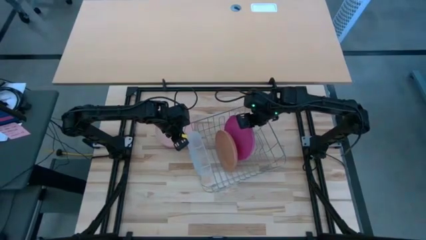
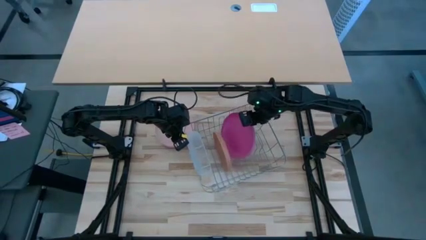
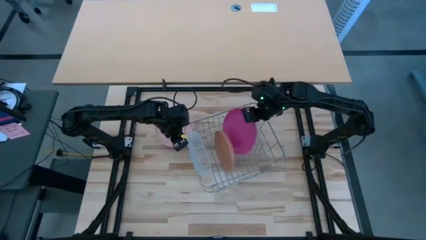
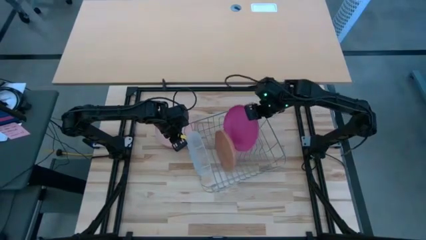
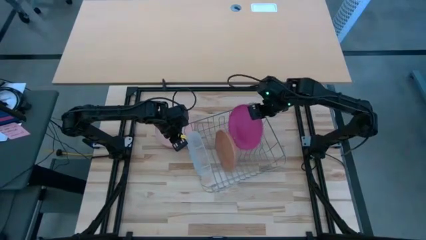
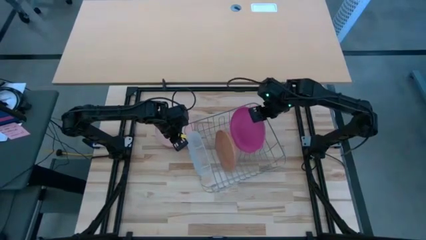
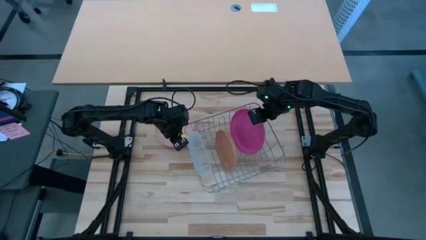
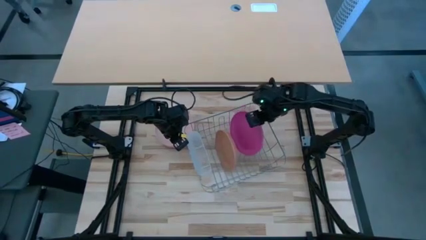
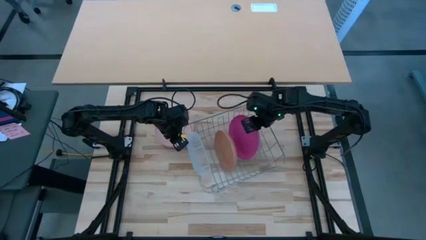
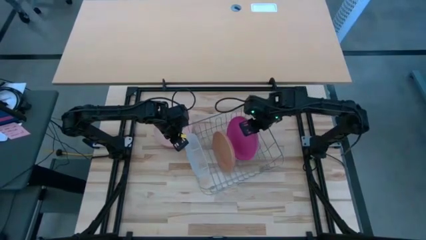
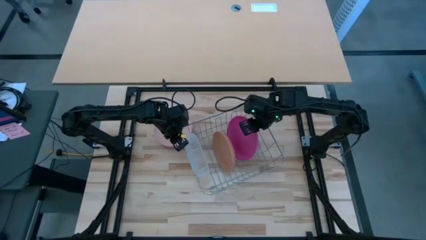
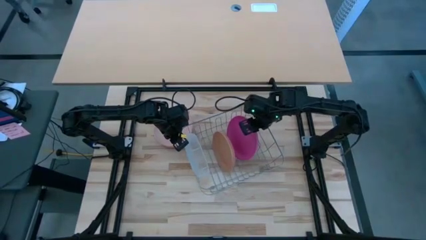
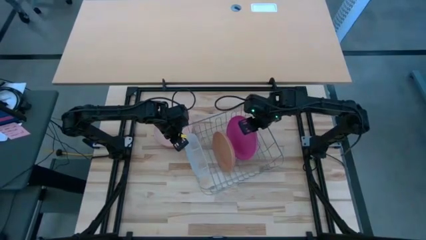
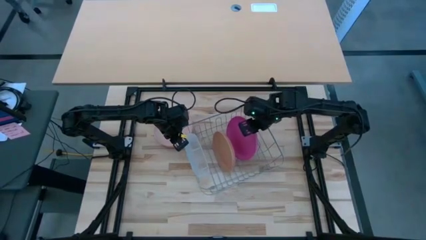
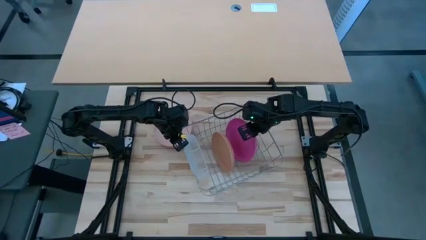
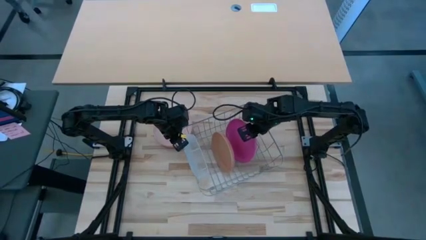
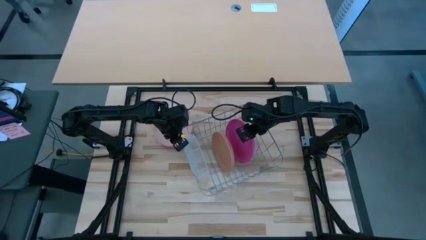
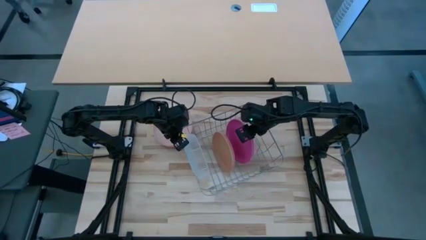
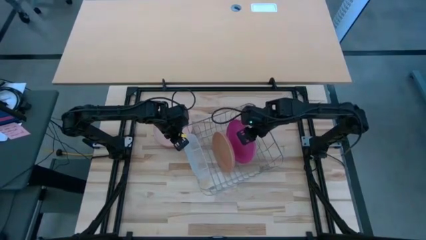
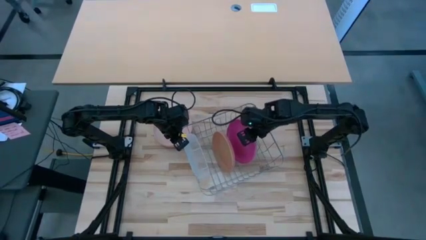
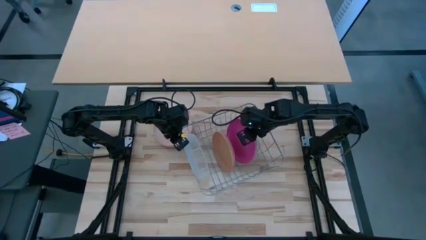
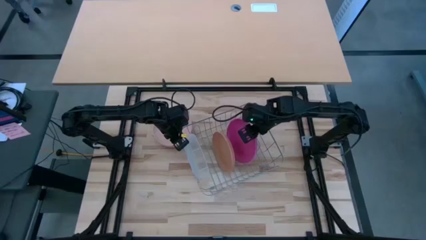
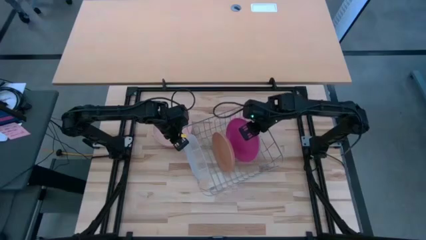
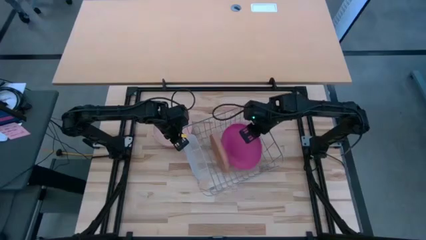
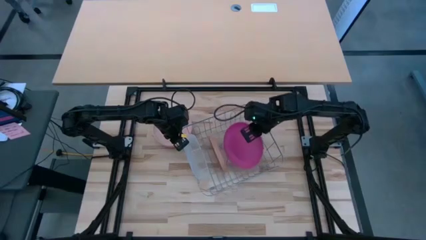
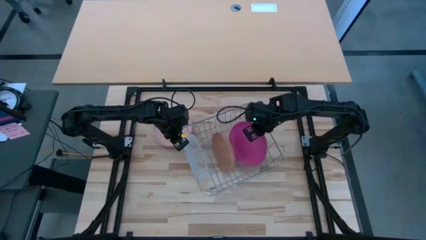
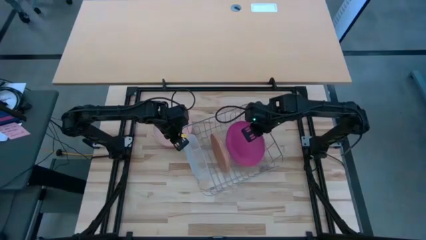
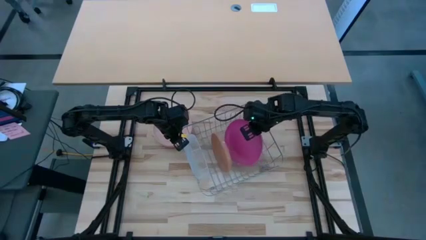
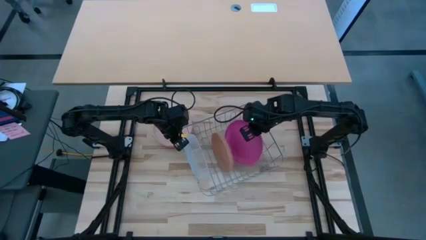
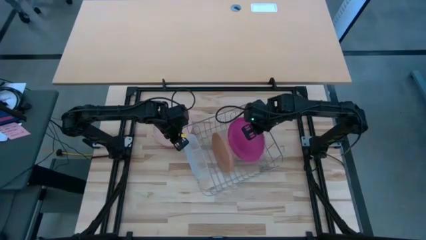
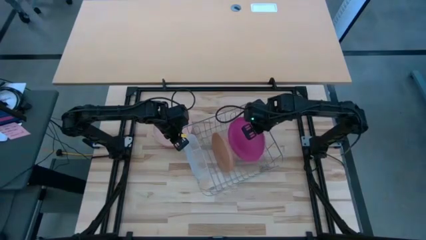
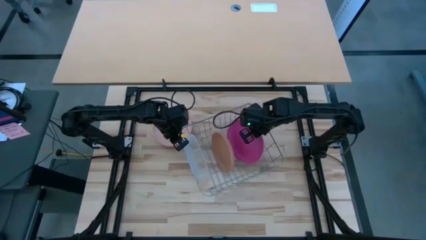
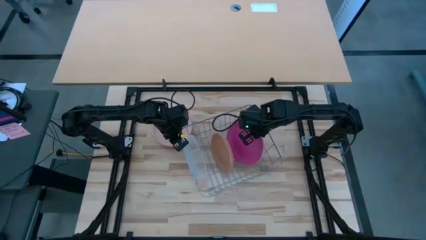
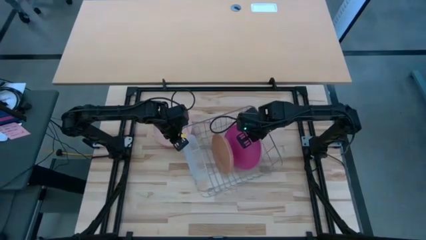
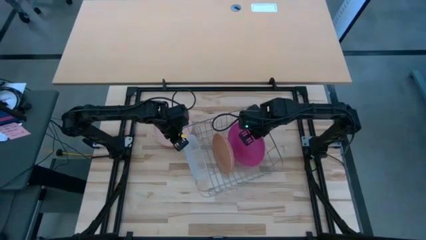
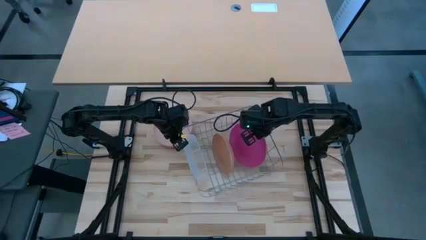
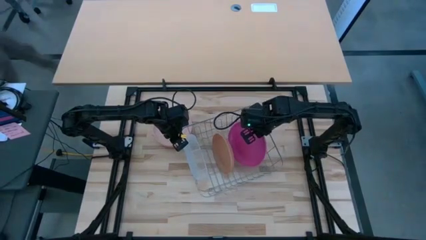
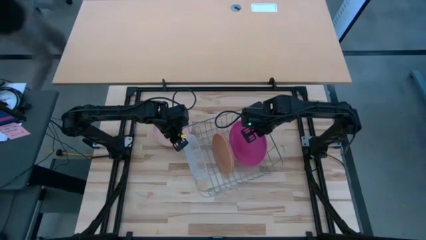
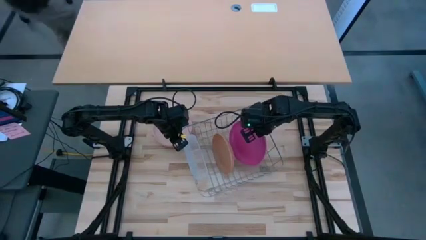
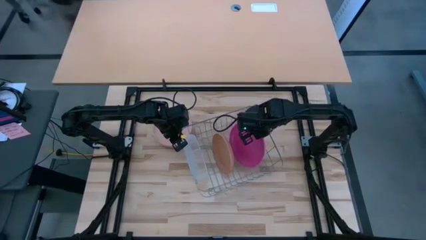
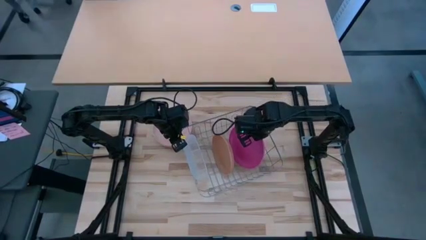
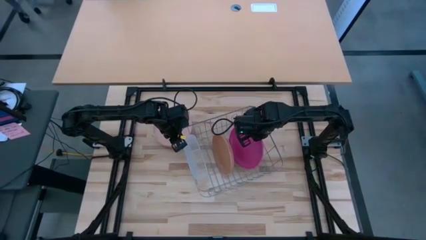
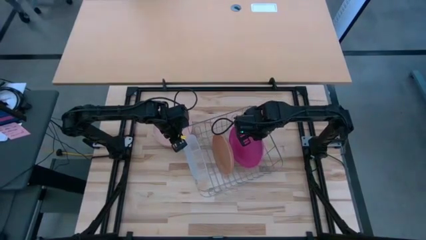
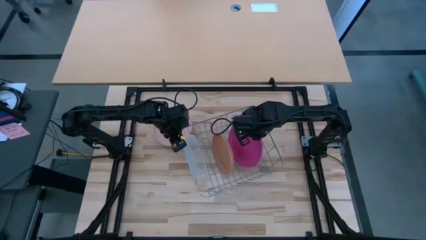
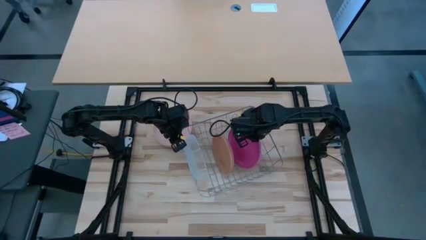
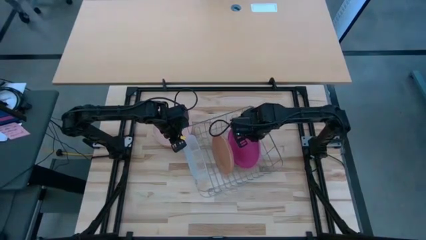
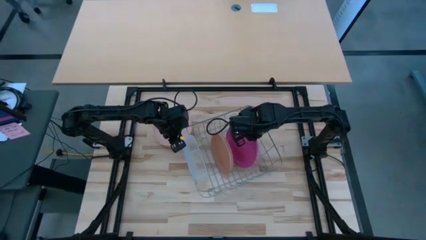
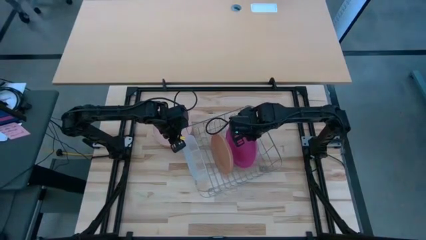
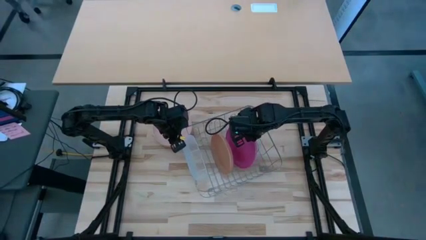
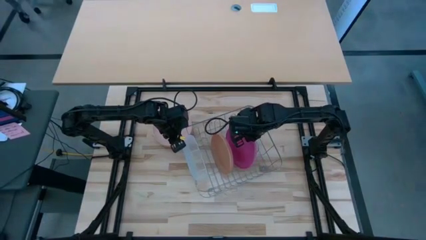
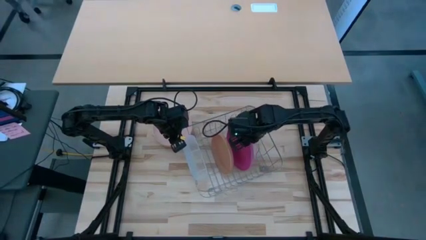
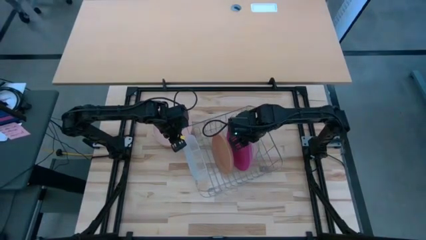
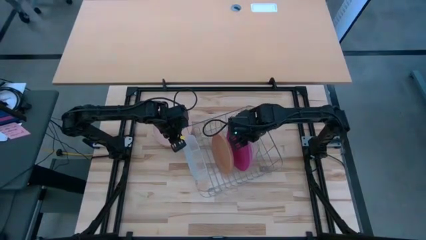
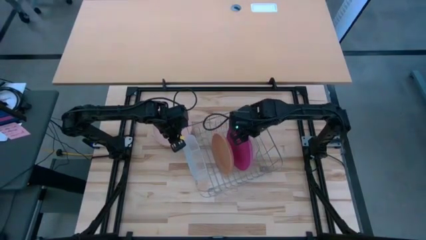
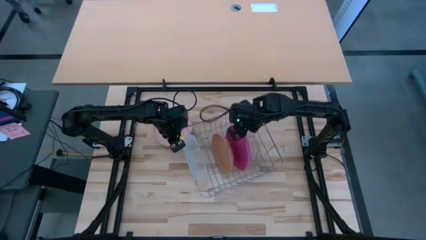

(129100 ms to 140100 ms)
Task: Sort dishes
Adjust the plates in the dish rack

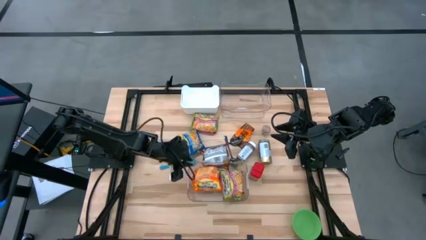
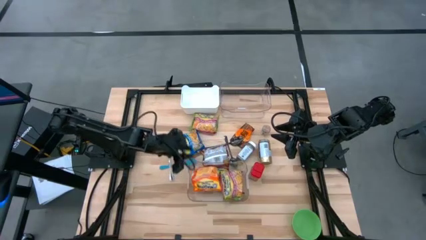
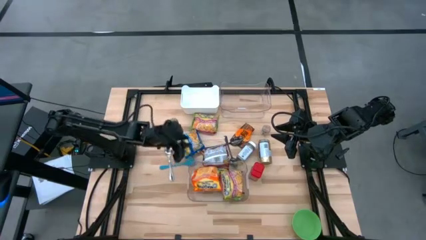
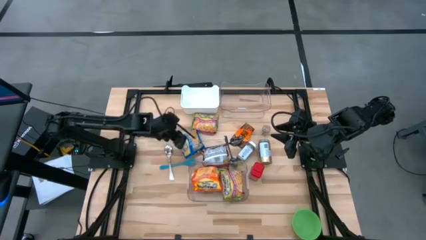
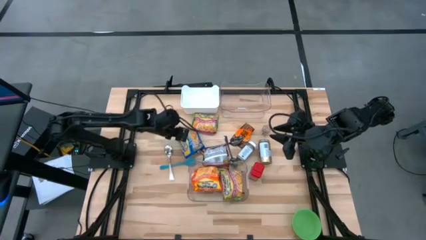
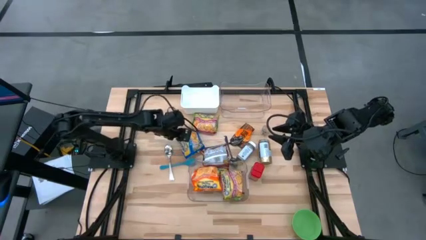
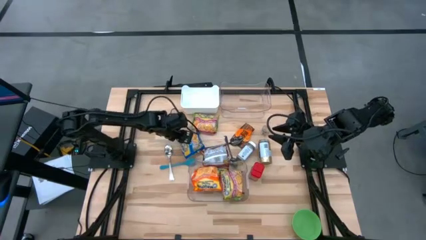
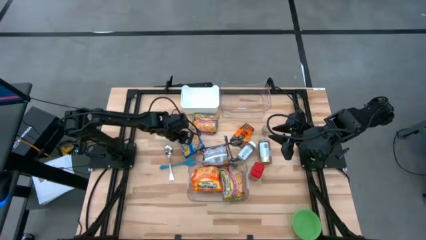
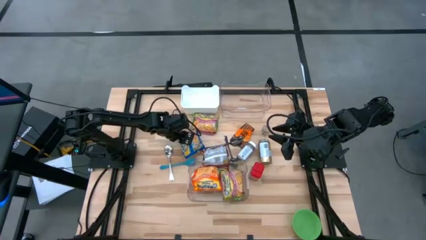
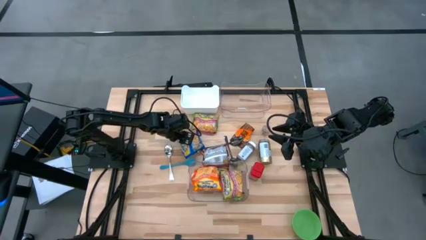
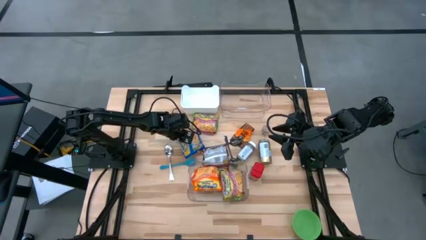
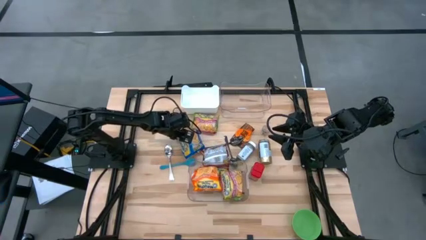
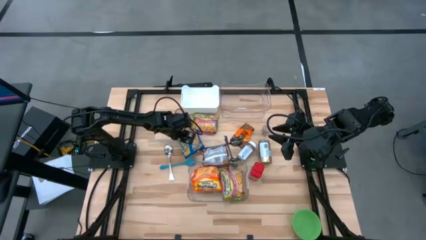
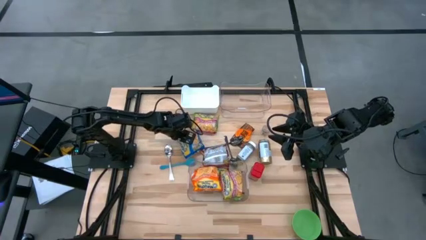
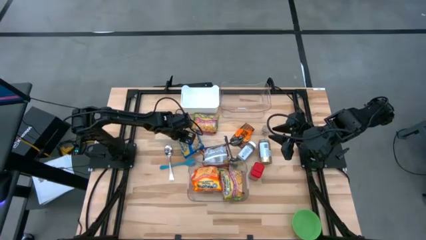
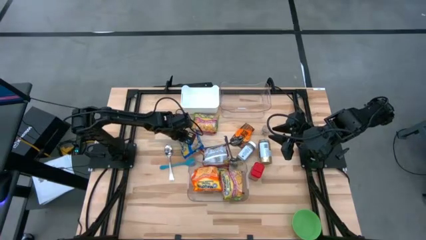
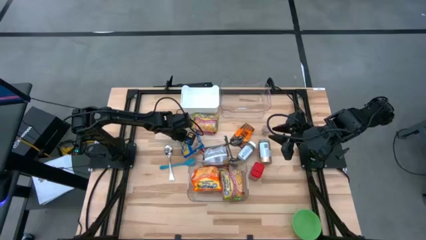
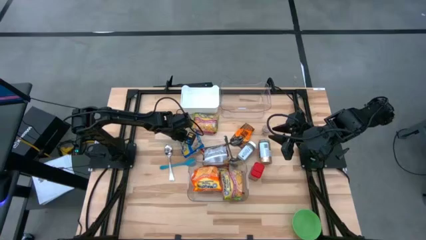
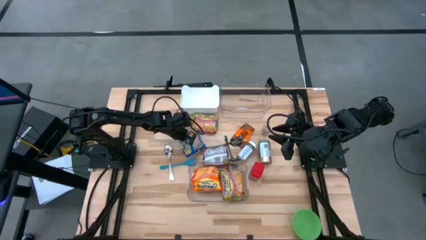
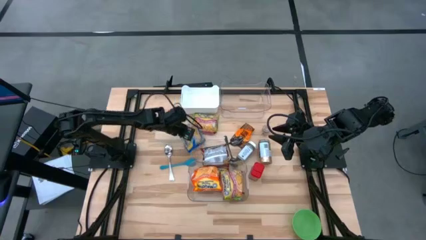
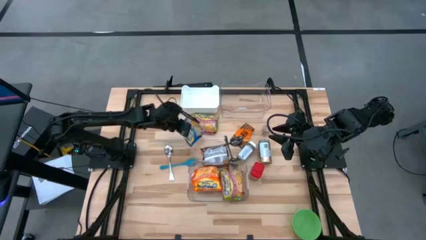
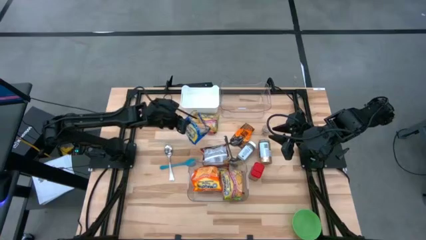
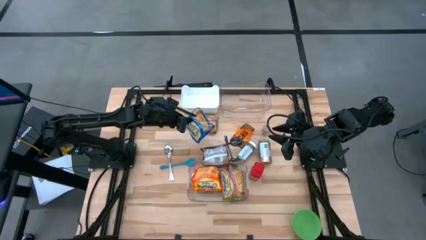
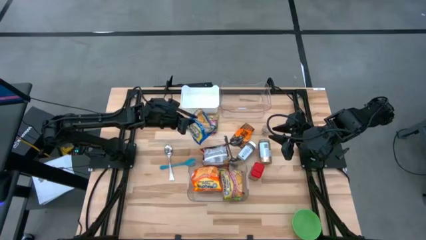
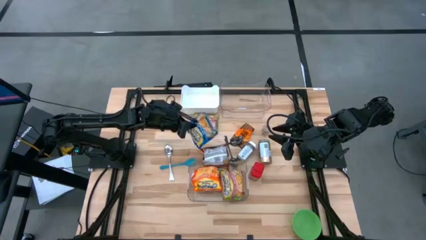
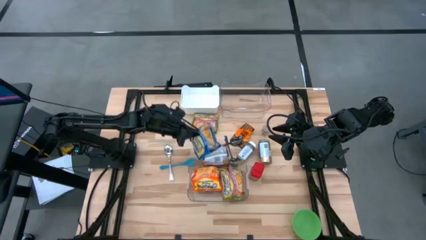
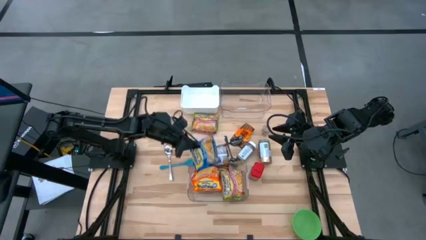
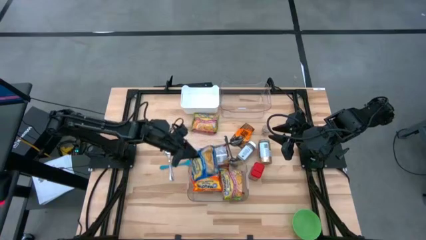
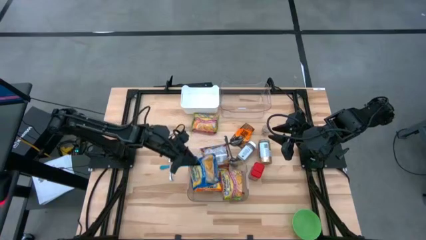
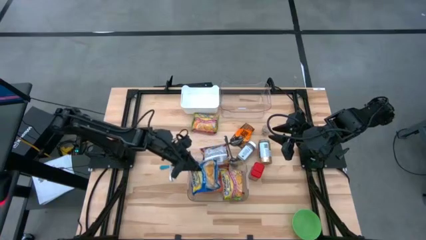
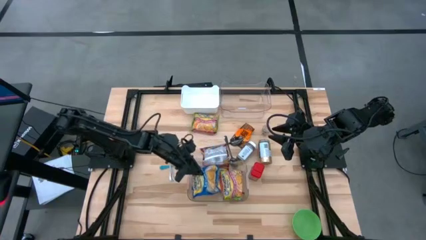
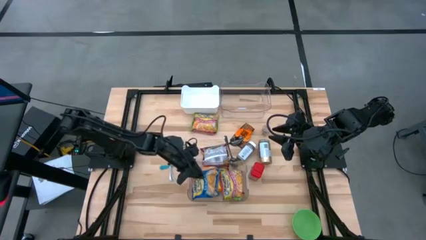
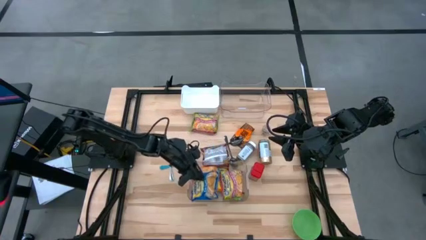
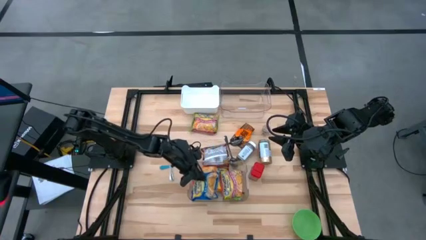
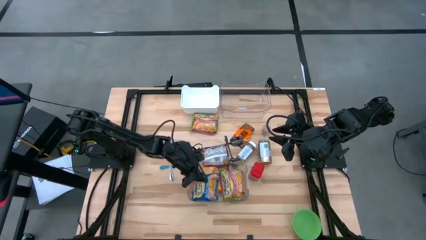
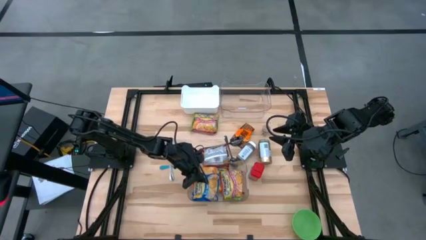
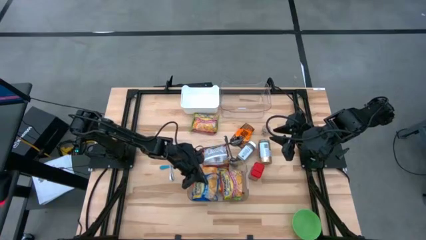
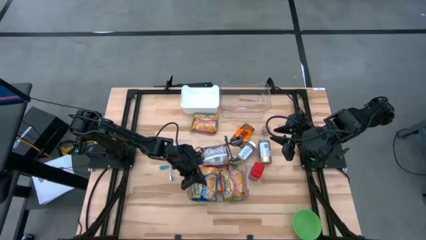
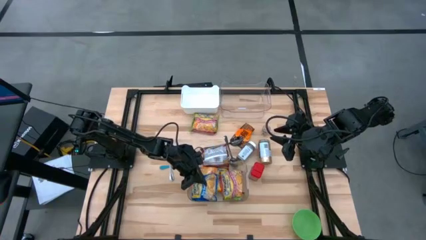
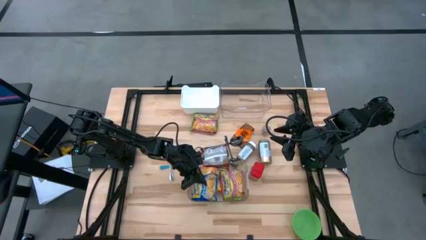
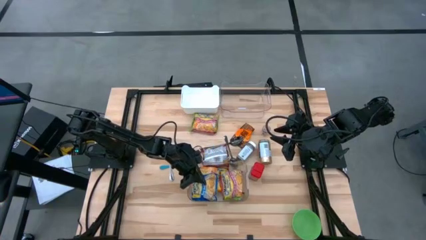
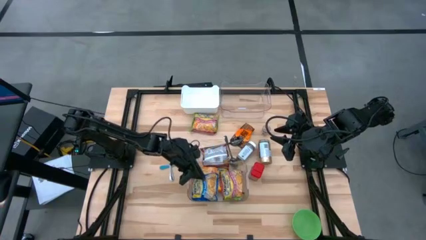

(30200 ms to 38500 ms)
Task: Pick & Place Food Item
Put the blue noodle pack into the bottom transparent bin
